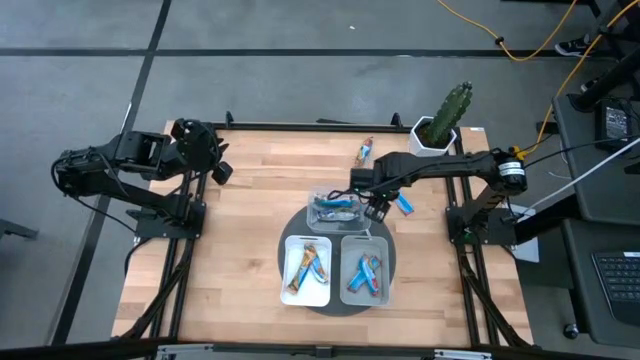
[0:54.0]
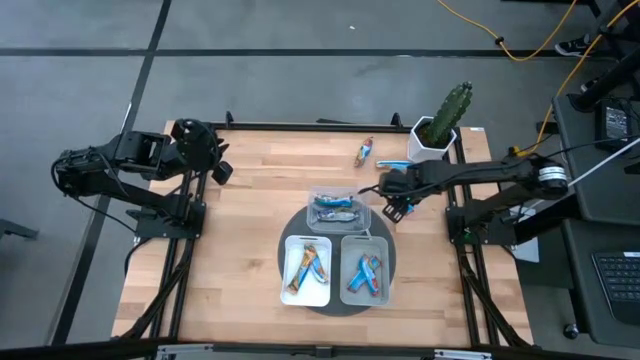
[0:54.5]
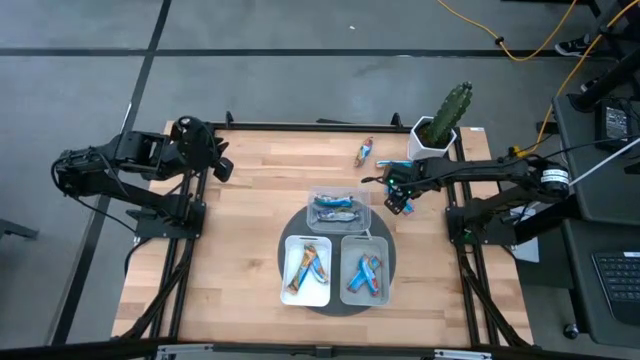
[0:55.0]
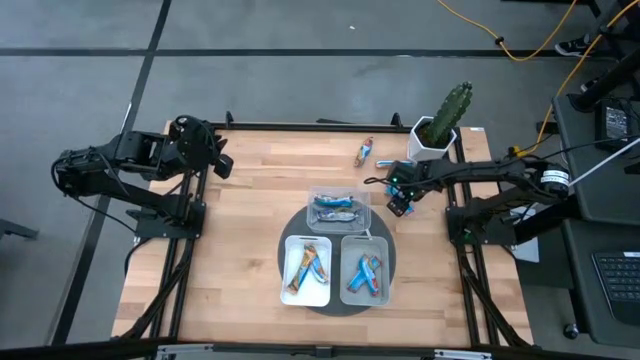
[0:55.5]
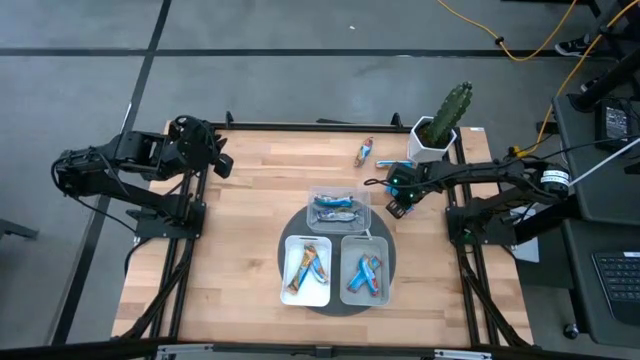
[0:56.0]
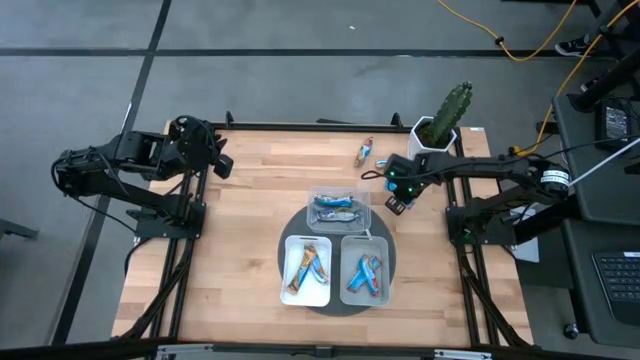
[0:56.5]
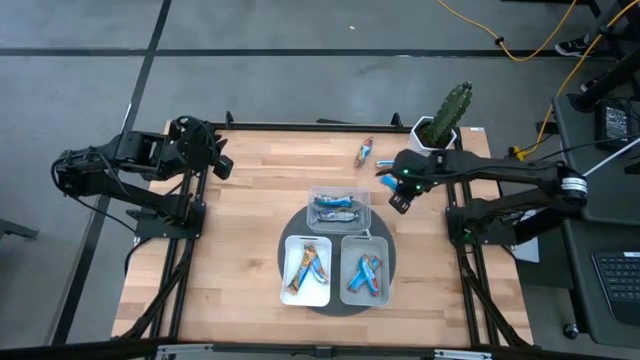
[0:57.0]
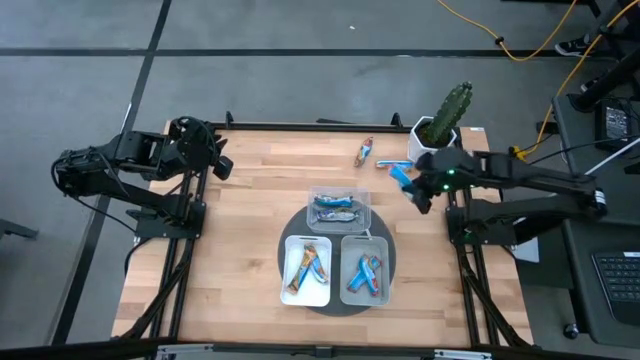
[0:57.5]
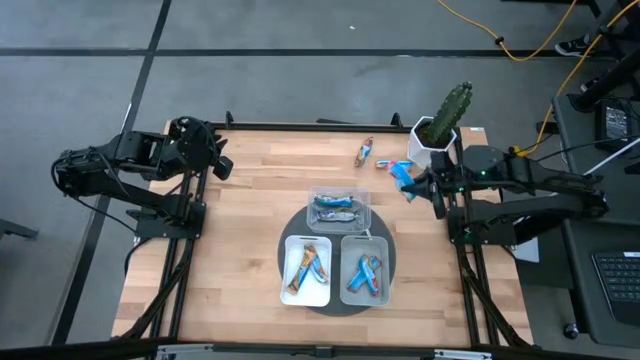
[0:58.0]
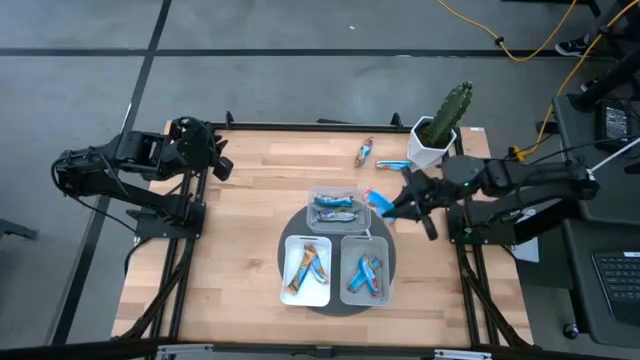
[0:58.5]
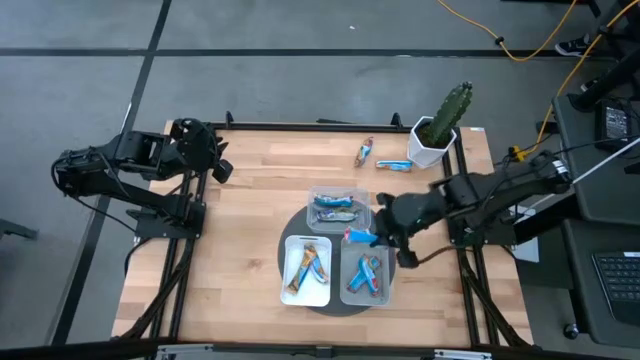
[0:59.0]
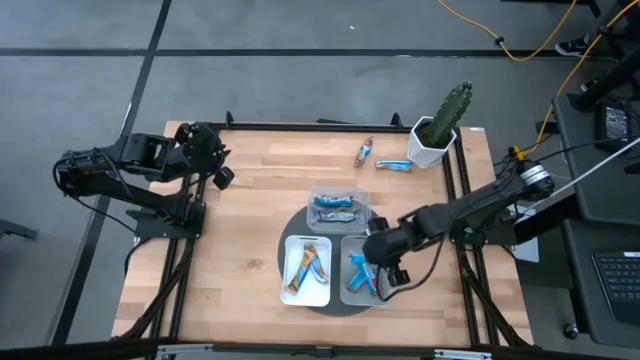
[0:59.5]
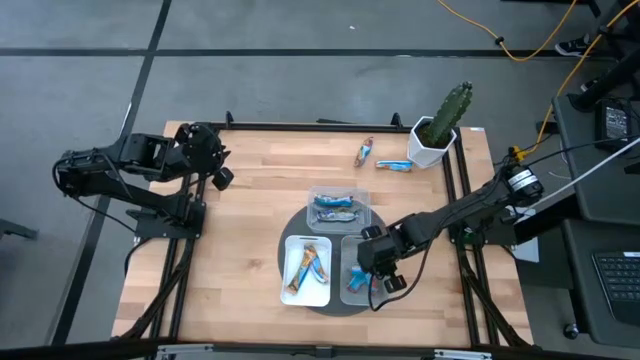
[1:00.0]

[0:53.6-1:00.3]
Task: Pick and place Granola Bars by type
Put the red chocolate chip into the grey bin

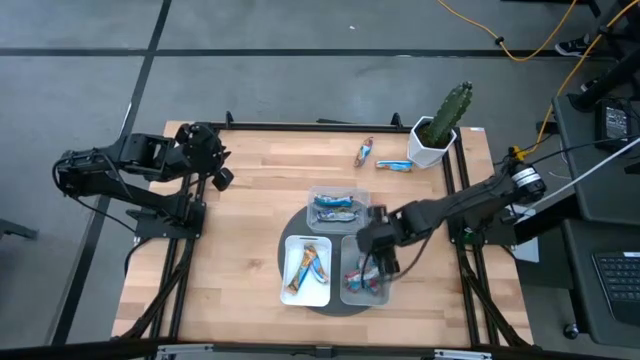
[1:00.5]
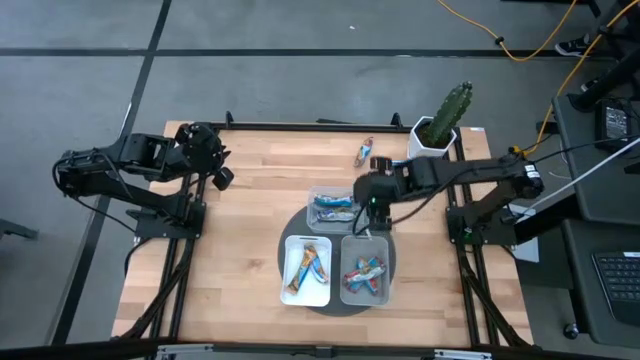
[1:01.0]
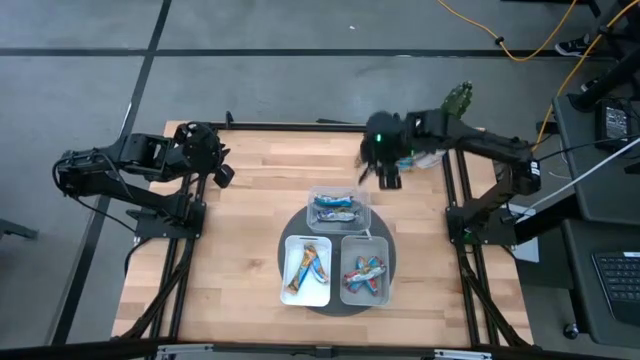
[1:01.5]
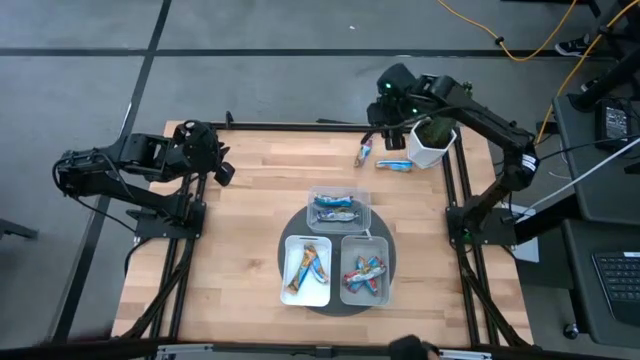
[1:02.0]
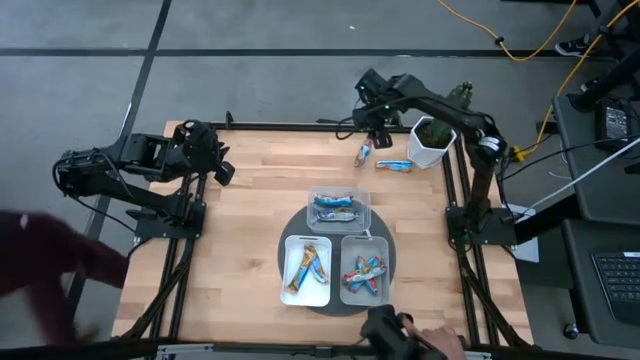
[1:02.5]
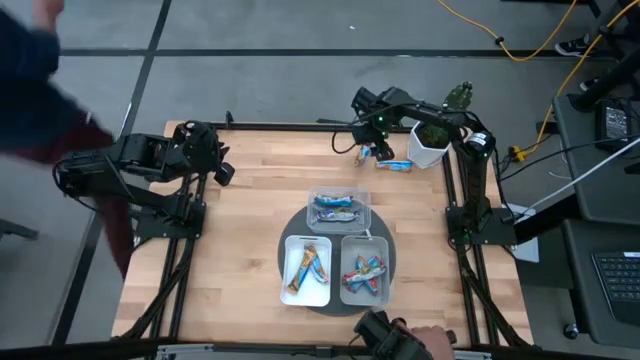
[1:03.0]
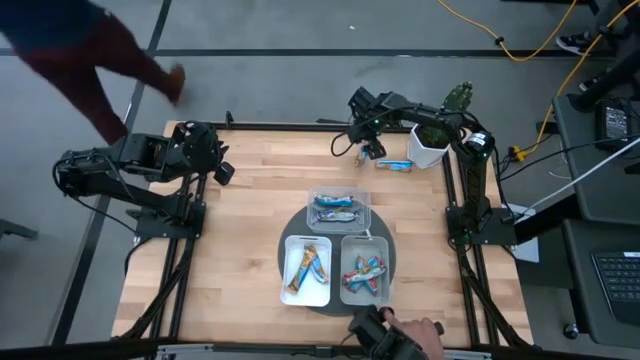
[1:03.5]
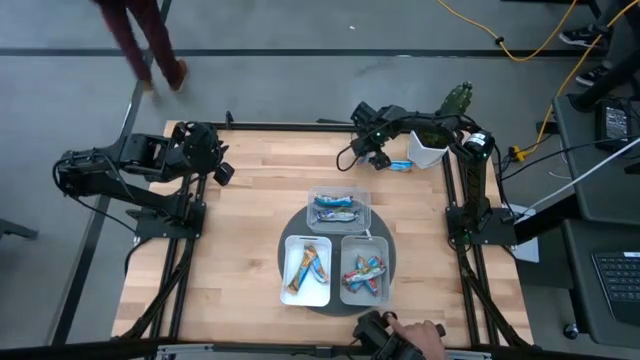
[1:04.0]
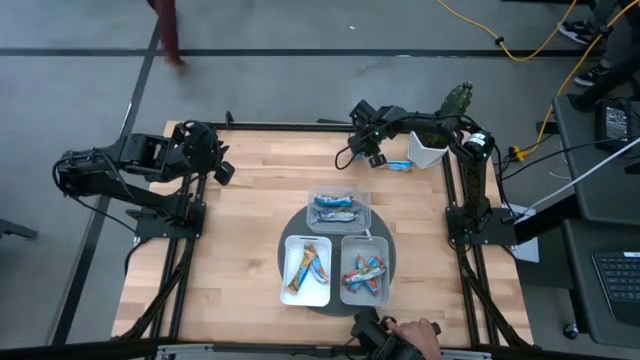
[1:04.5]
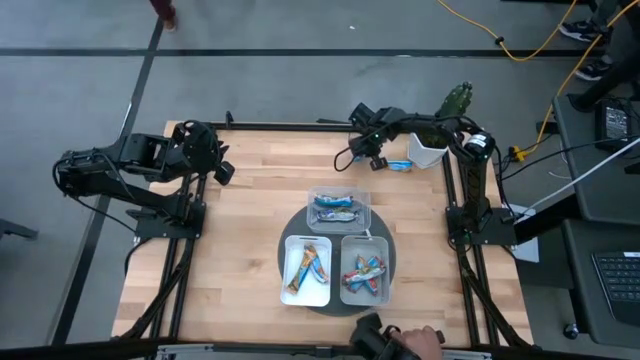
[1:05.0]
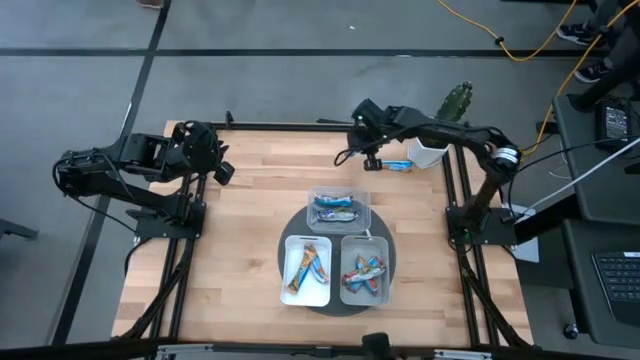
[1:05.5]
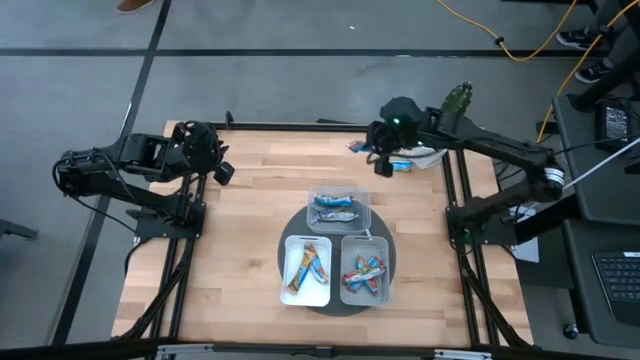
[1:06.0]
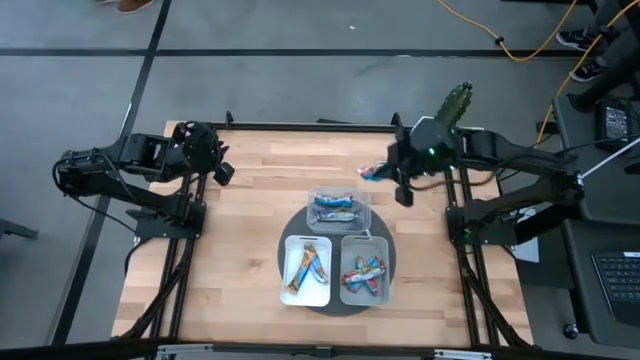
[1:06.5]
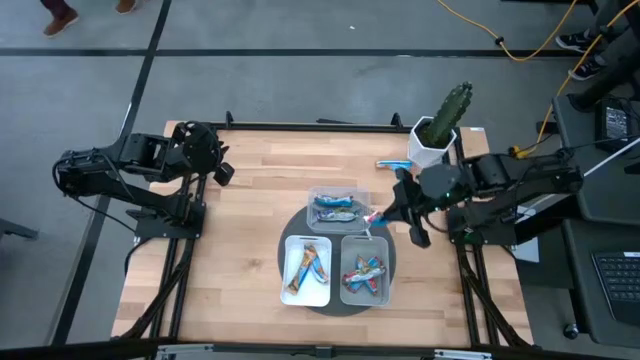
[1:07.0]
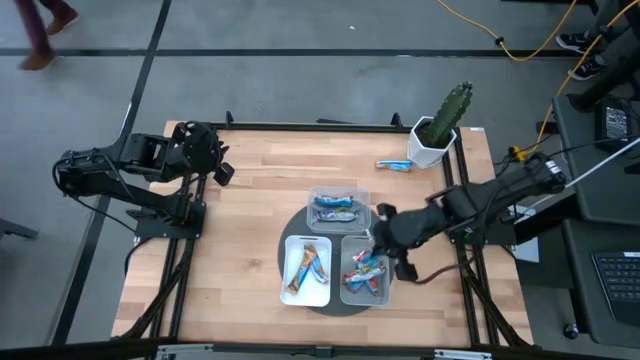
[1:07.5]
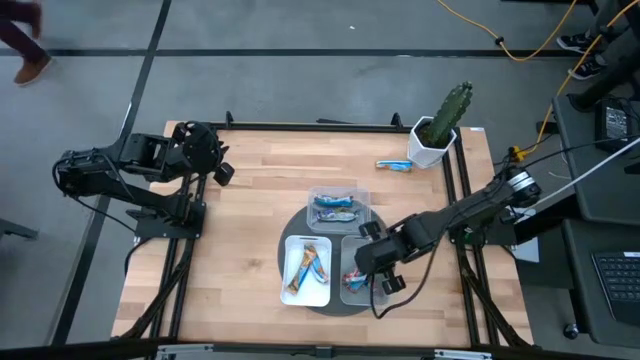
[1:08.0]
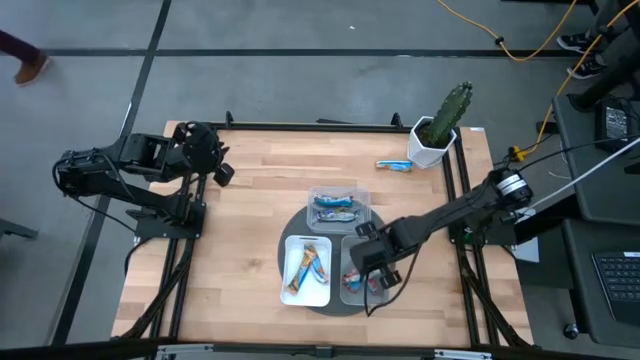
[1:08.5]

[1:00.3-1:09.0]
Put the red chocolate chip in the grey bin

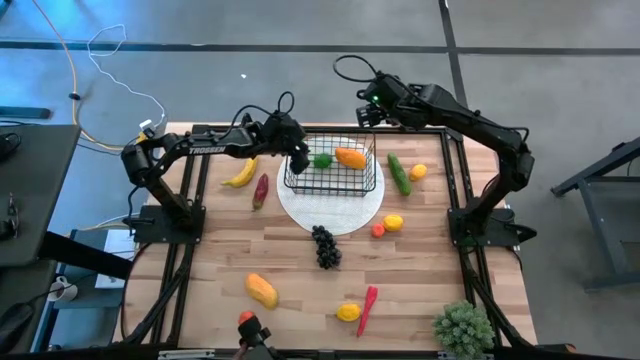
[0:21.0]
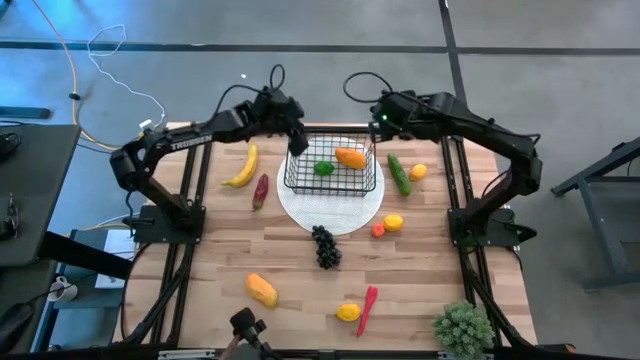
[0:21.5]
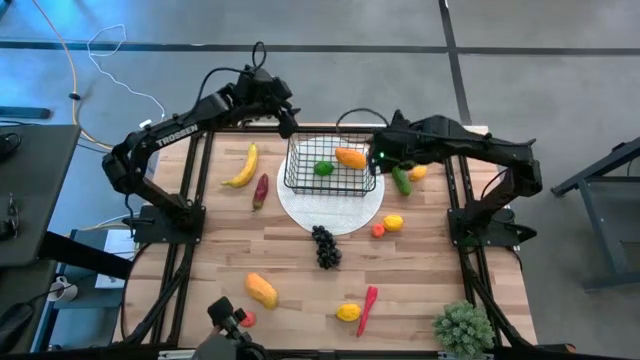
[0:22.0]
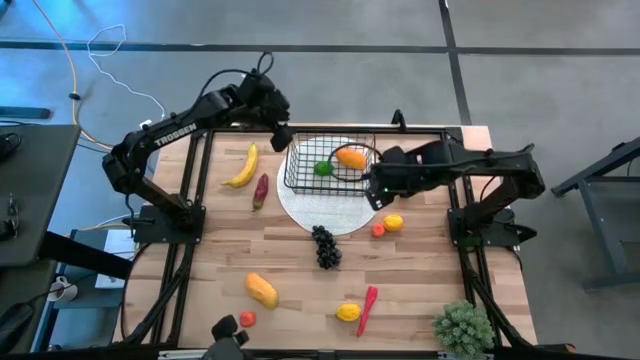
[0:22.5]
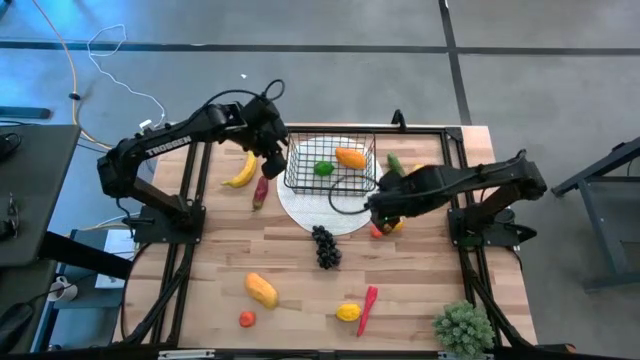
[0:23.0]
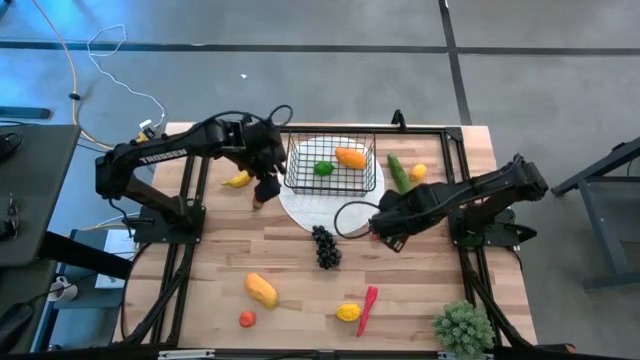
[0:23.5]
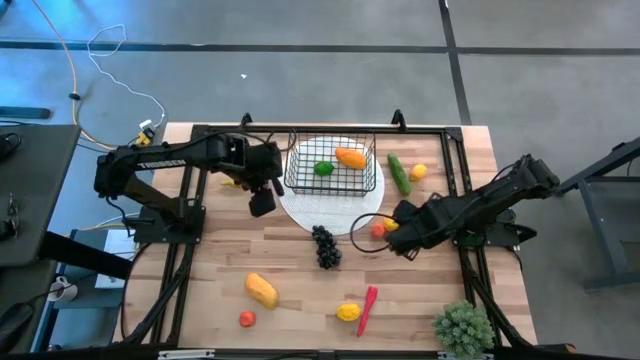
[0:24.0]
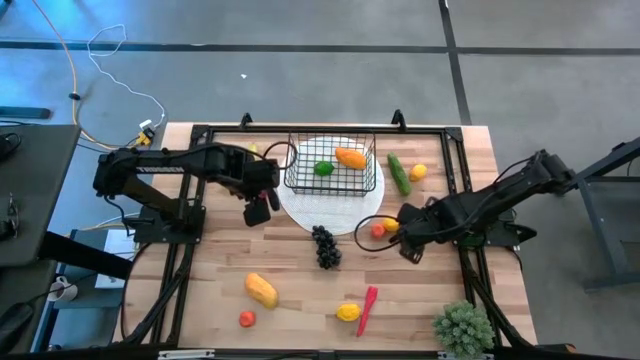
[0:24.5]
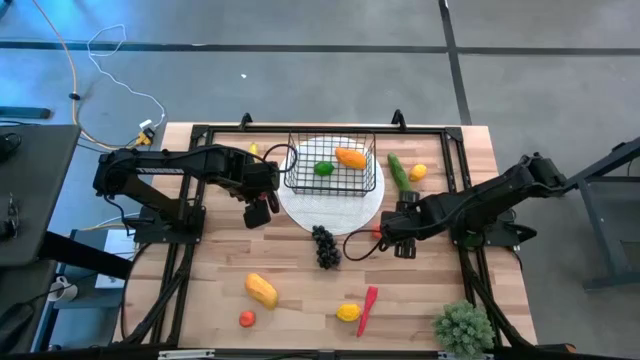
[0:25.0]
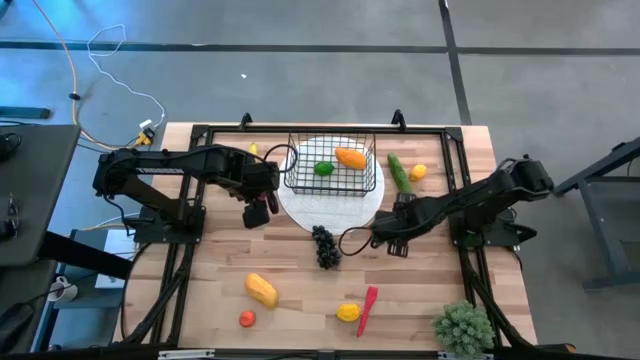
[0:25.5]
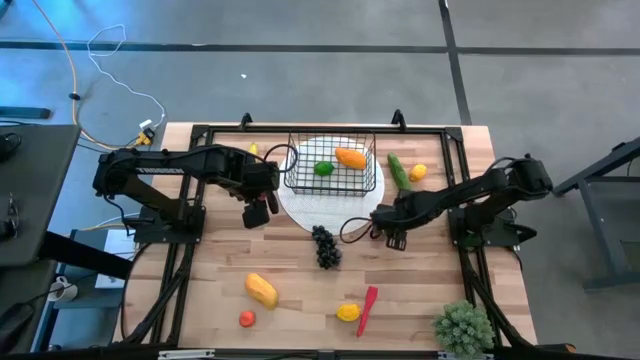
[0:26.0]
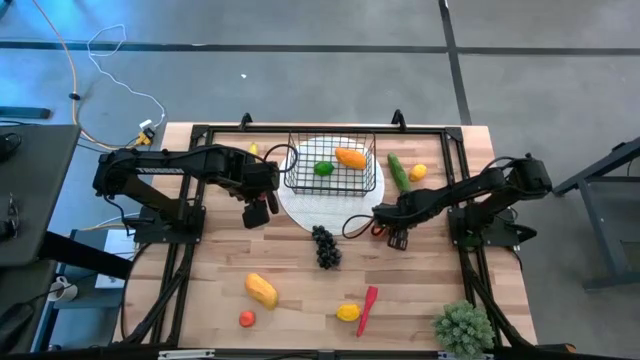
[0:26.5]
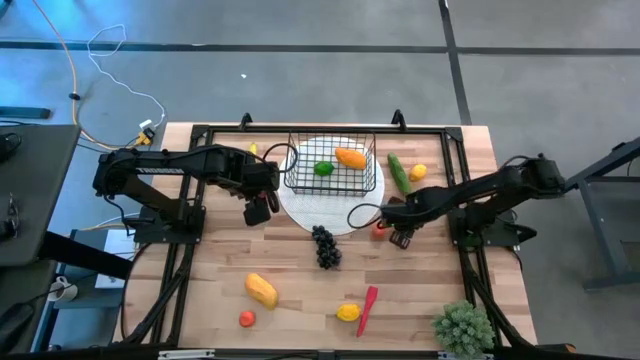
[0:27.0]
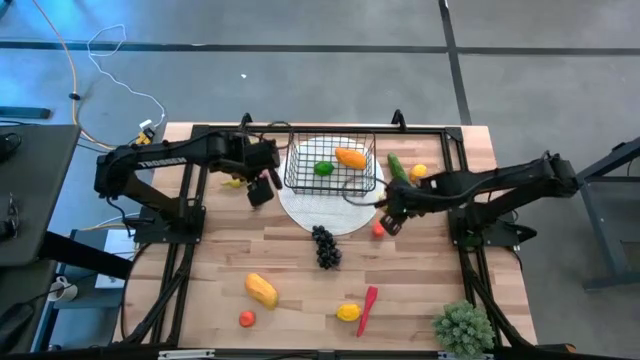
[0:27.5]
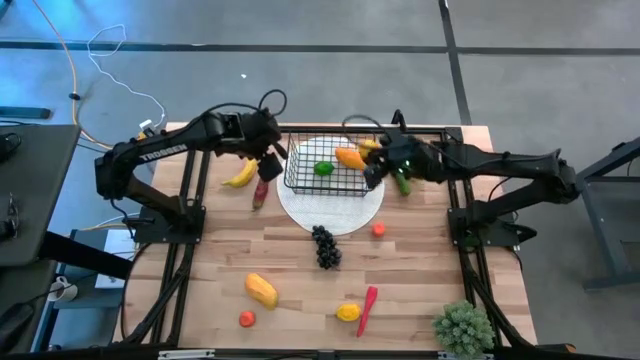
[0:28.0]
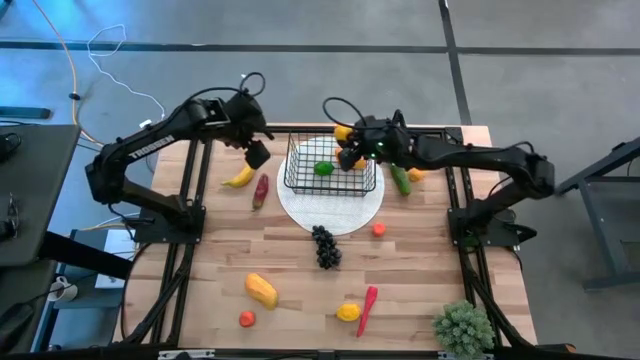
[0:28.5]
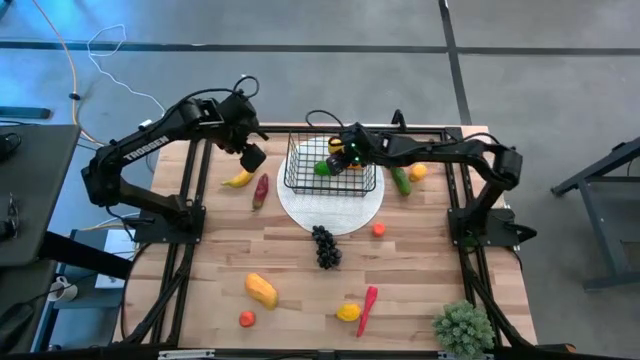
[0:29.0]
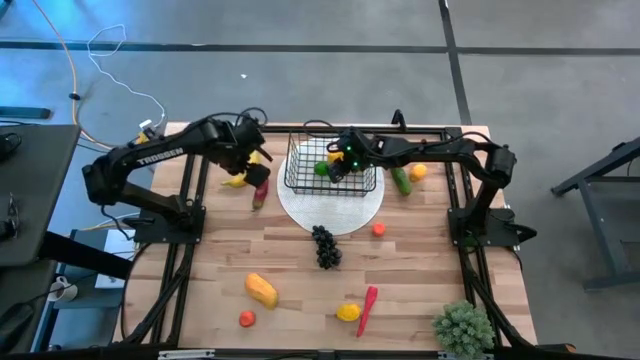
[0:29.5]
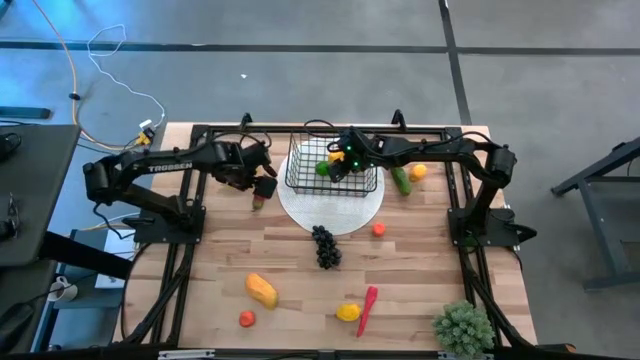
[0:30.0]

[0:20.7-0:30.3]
Task: Build produce basket
Put the middle yellow lemon into the wire basket
